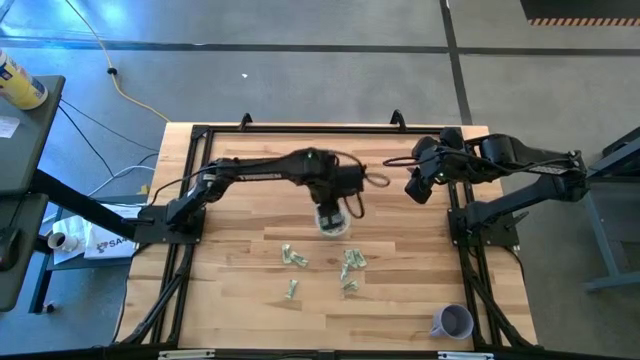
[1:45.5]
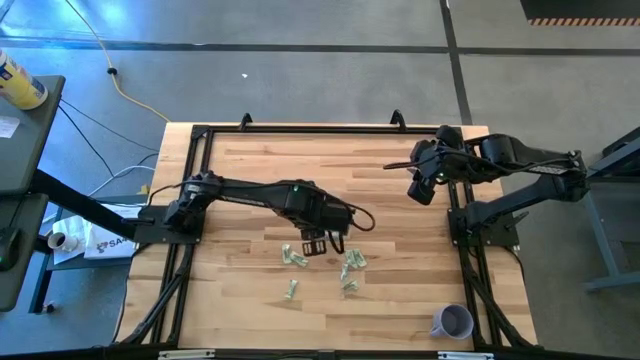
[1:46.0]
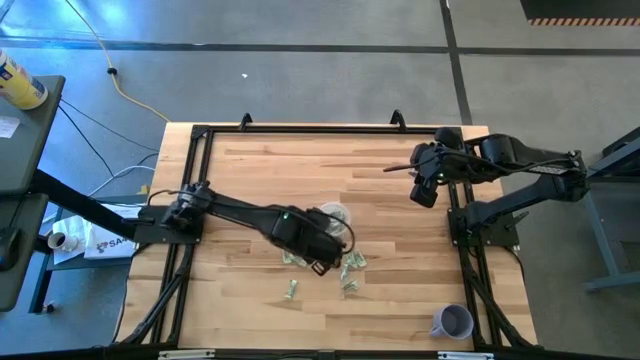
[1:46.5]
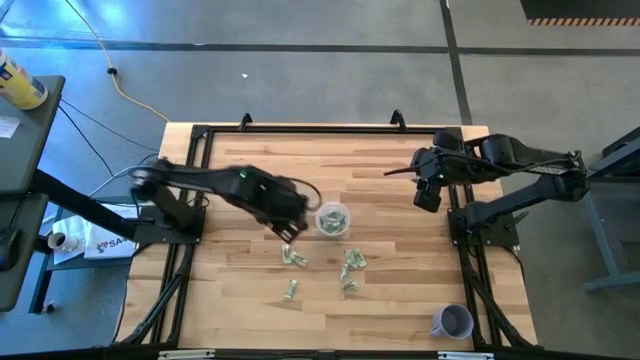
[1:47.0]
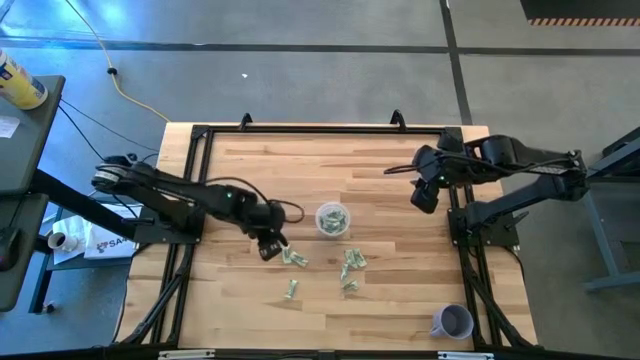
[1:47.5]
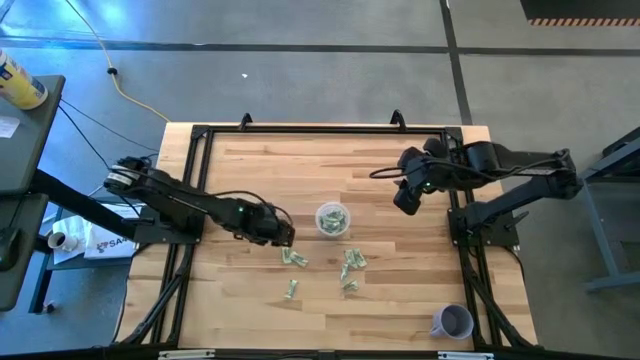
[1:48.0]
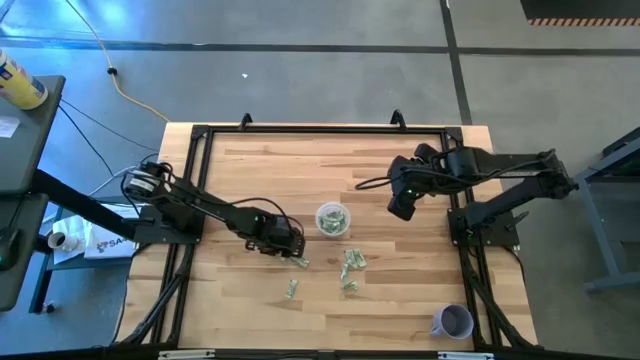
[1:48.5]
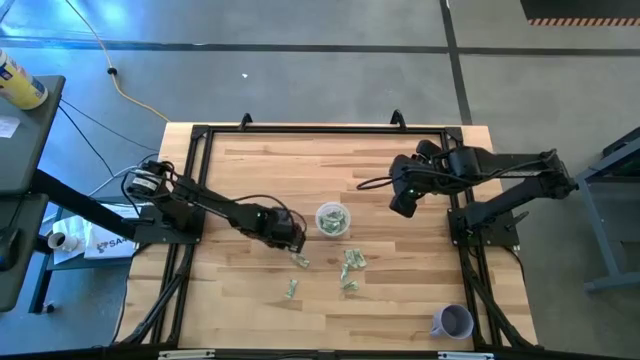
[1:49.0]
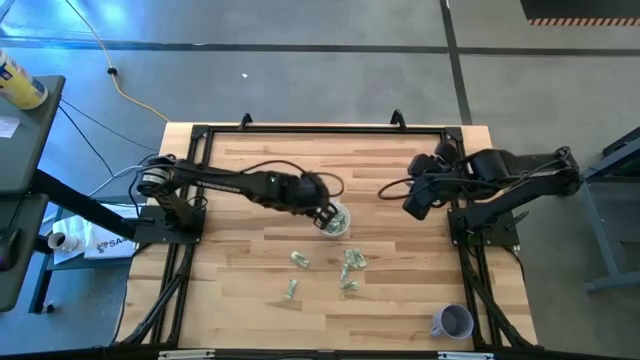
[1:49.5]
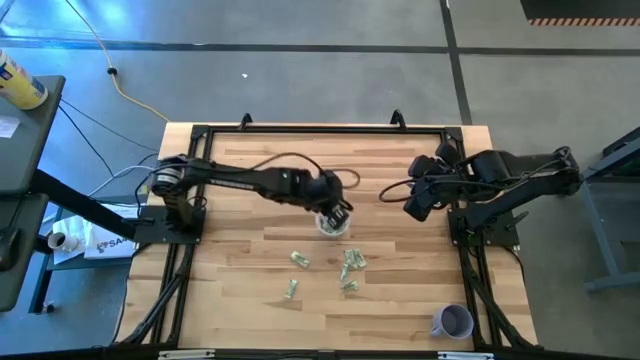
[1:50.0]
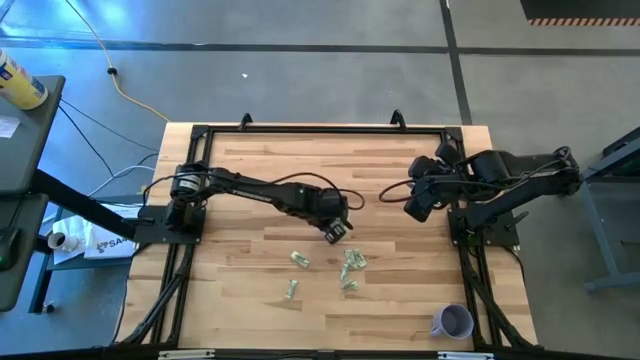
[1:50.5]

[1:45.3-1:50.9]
Task: Pick and place Stevia / Truvia into bins
Put the white stevia packet into the transparent container

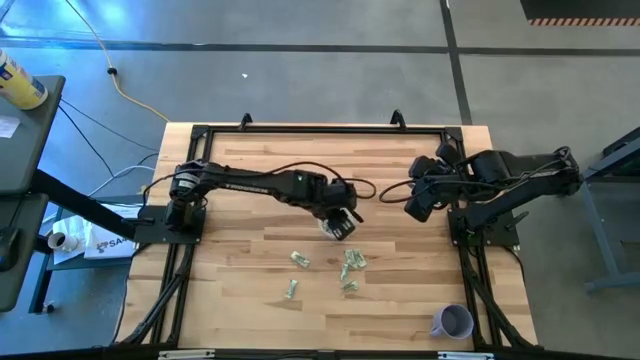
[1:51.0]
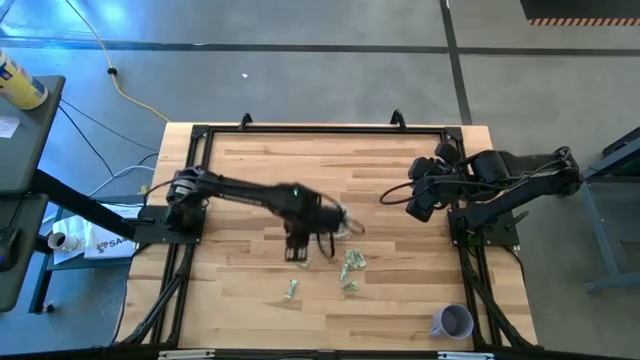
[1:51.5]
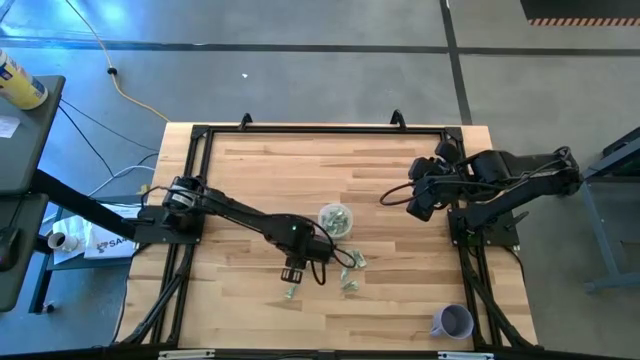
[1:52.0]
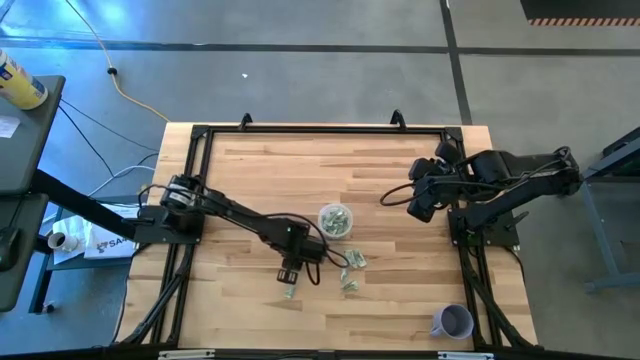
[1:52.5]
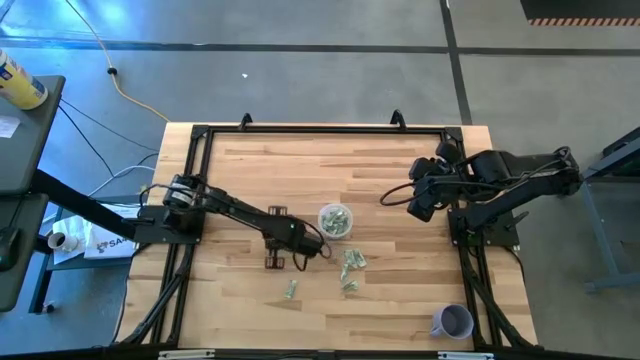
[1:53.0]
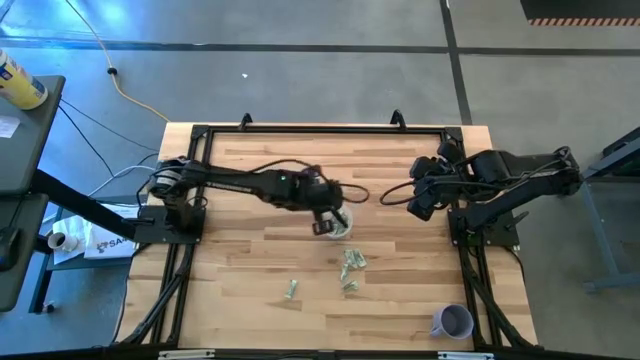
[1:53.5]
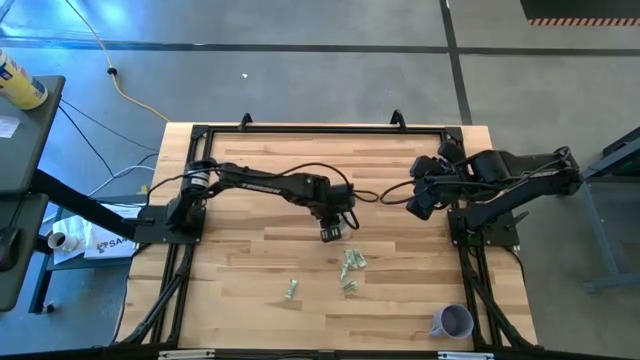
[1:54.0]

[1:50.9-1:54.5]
Put the white stevia packet into the transparent container

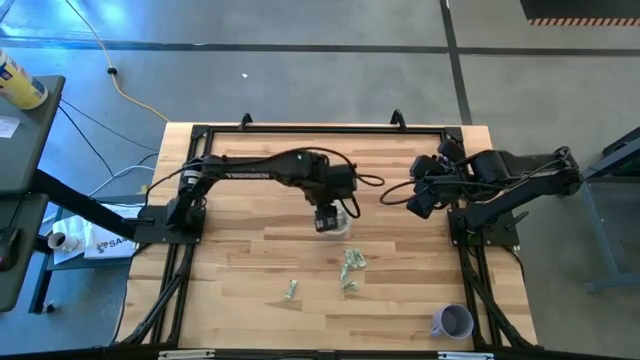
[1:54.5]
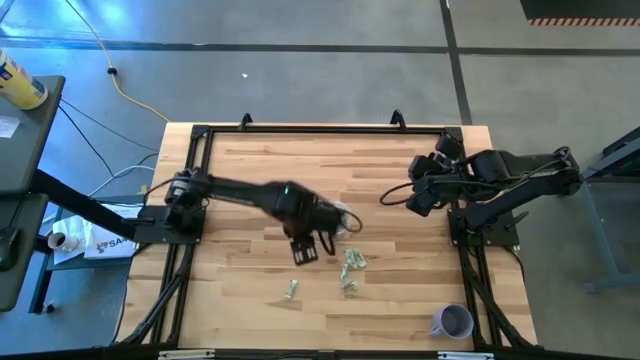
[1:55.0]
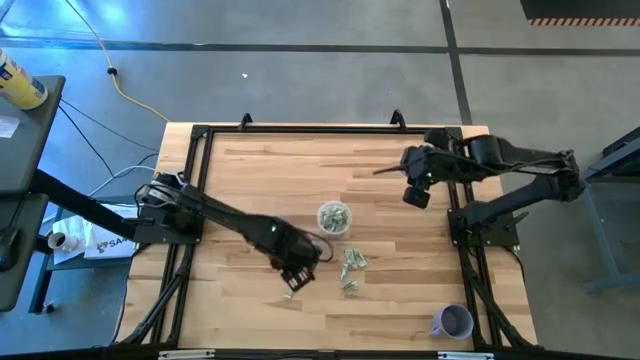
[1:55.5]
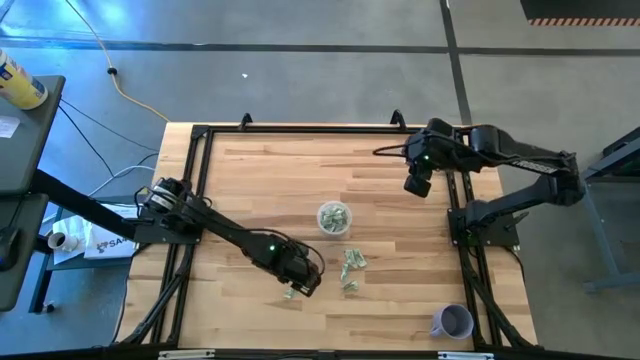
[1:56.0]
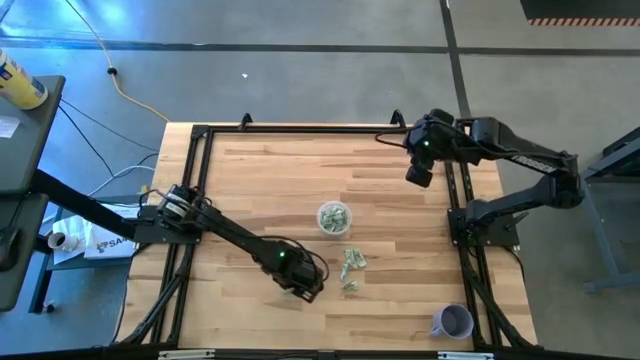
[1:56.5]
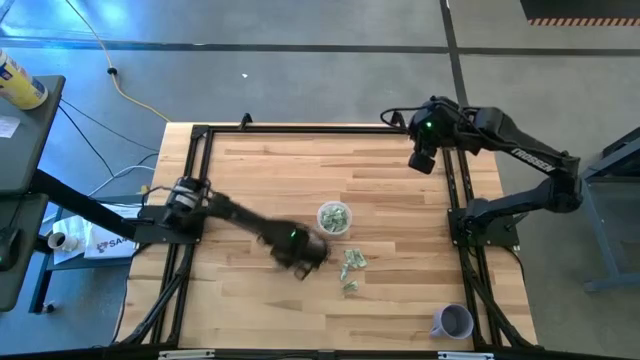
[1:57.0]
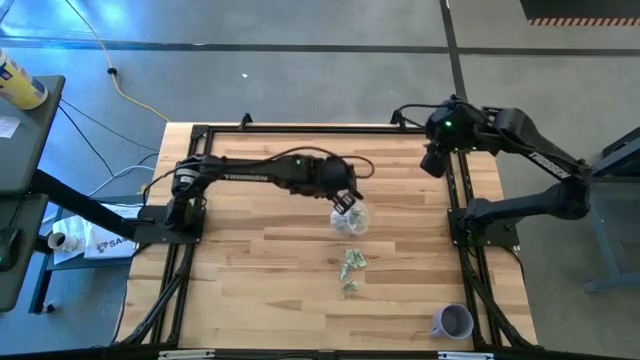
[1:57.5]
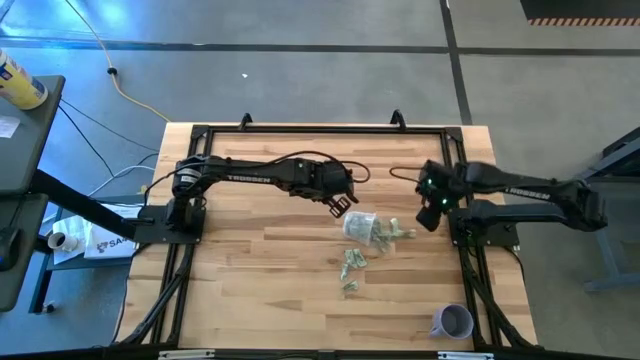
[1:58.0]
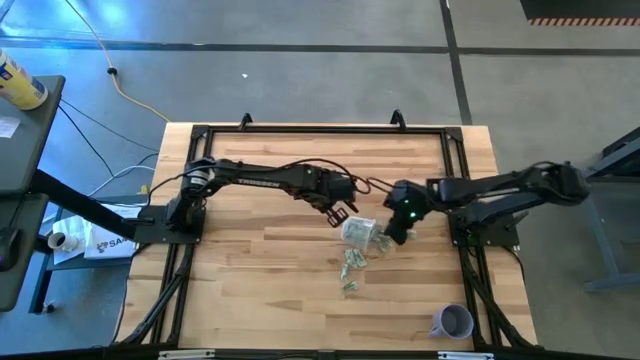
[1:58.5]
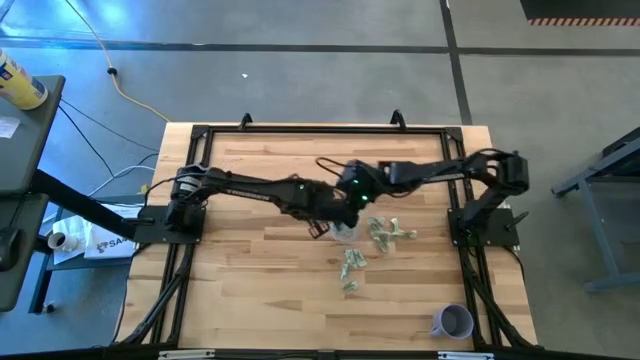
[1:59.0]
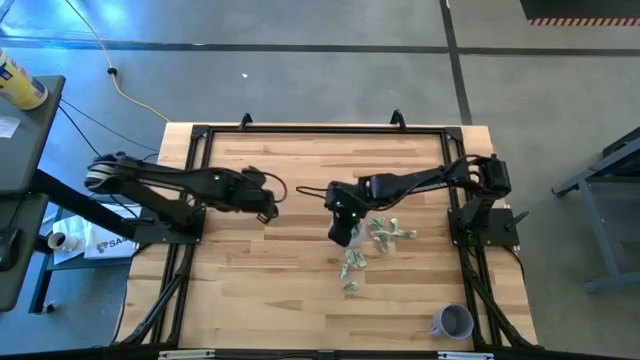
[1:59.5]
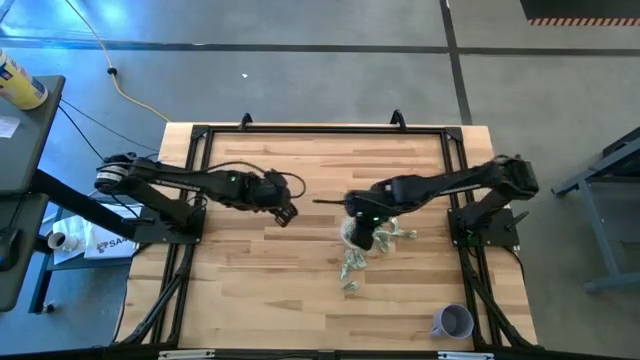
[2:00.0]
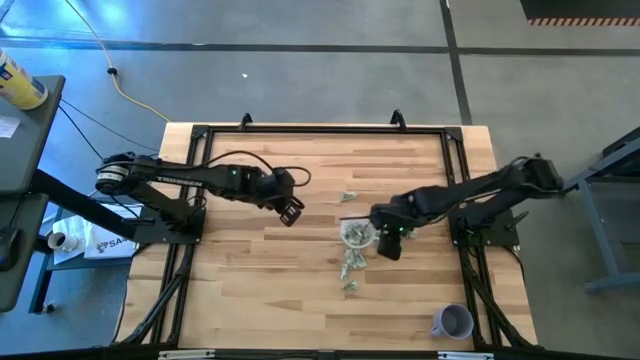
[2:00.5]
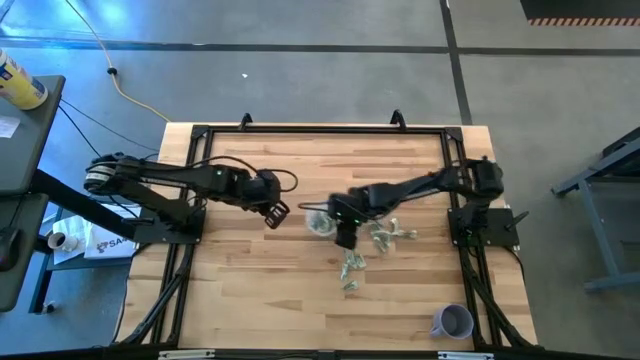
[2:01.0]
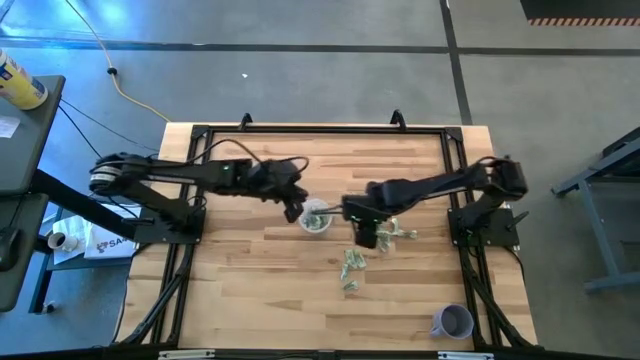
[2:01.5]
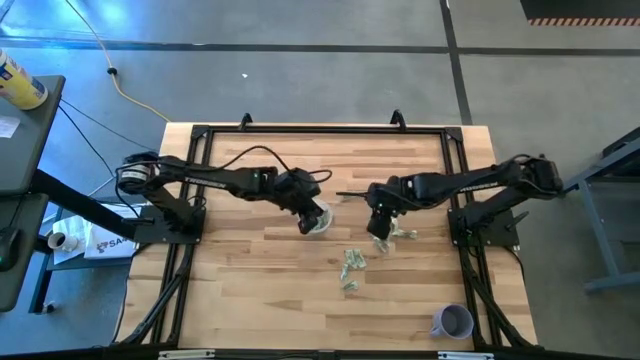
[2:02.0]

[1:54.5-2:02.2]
Put the white stevia packet into the transparent container

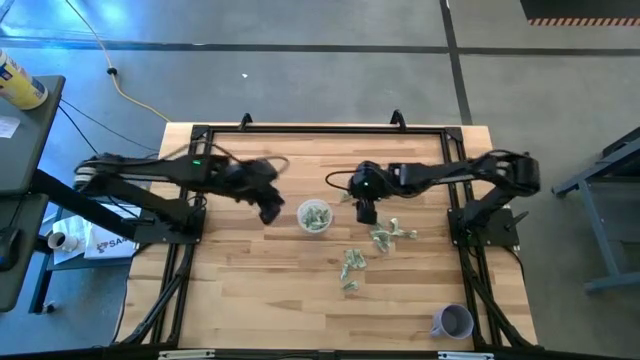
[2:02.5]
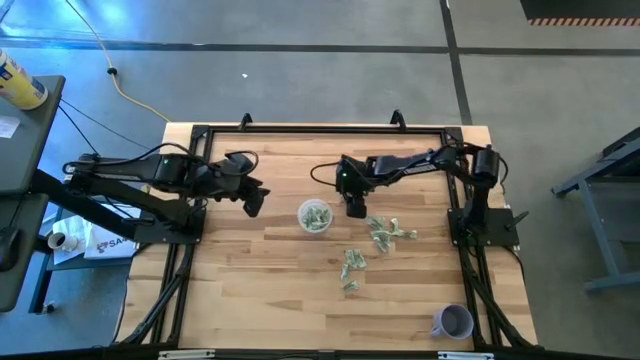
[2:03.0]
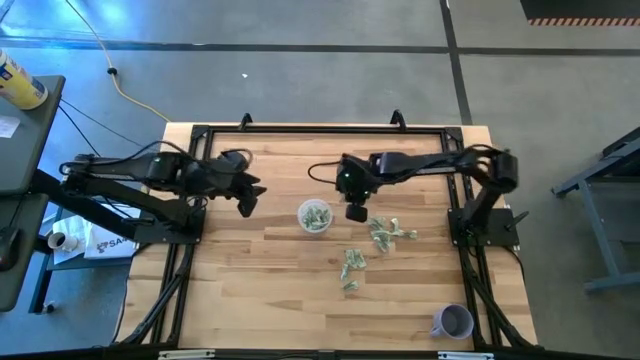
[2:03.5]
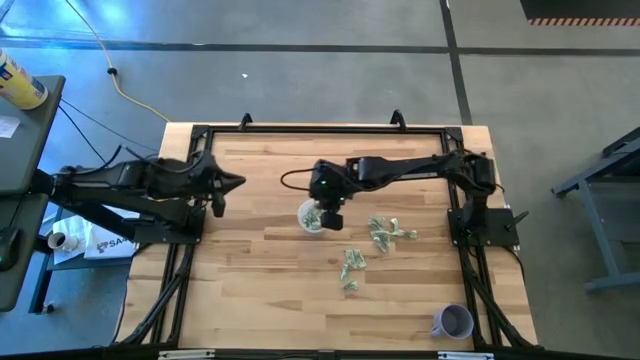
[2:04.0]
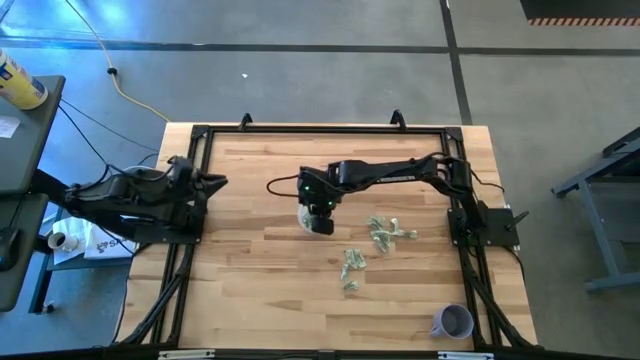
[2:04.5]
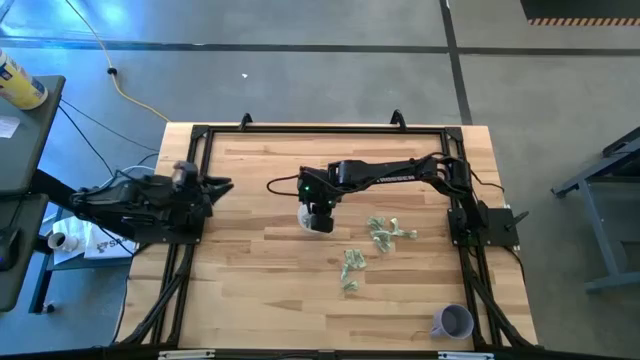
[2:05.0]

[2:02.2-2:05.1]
Put the white stevia packet into the transparent container

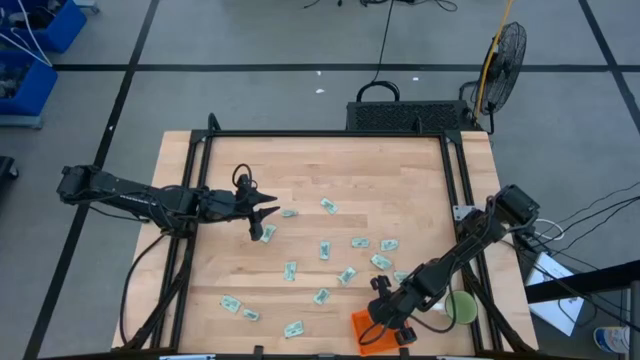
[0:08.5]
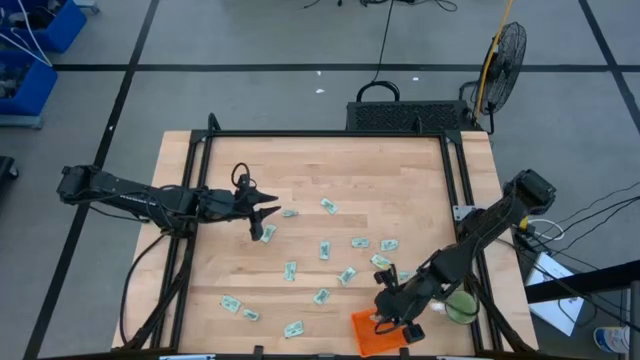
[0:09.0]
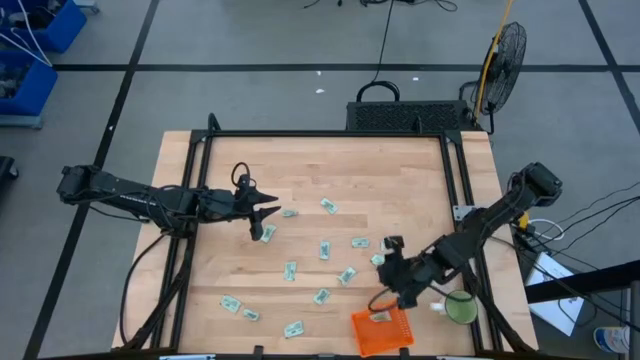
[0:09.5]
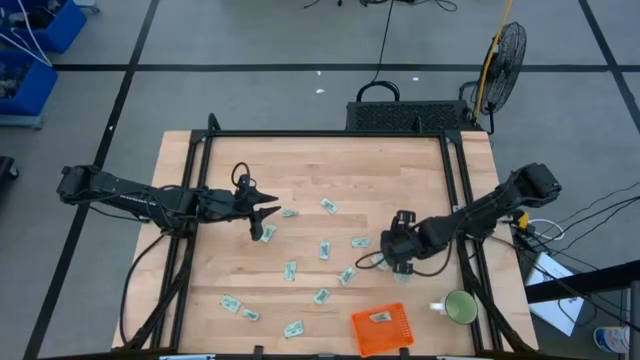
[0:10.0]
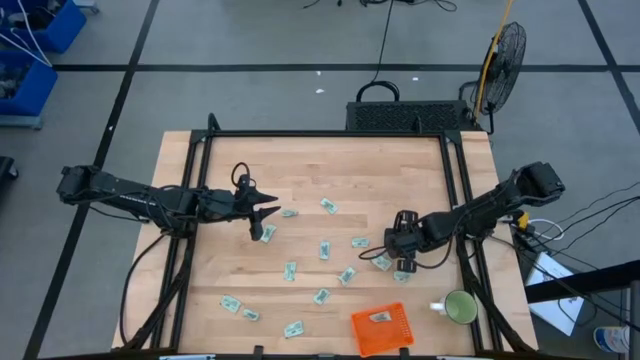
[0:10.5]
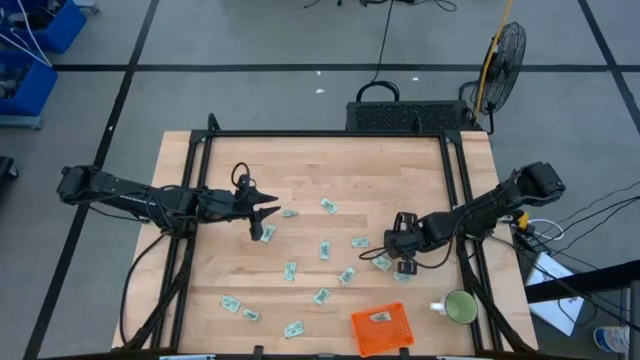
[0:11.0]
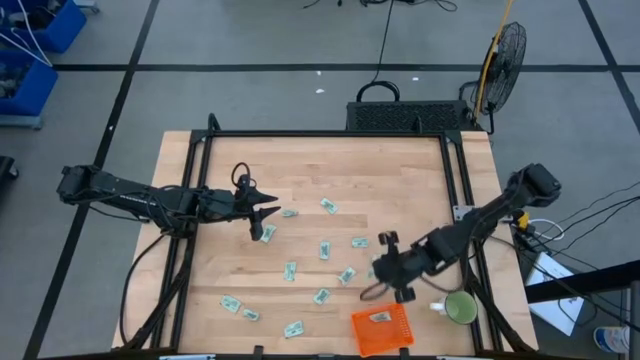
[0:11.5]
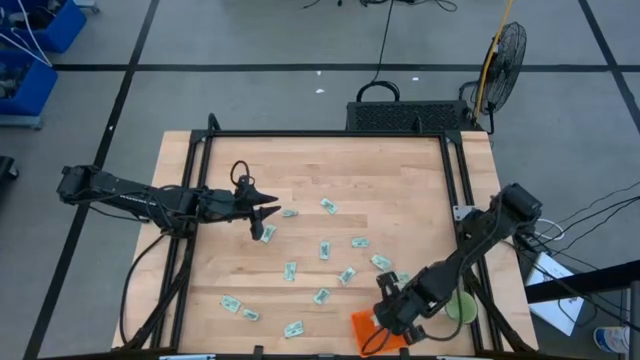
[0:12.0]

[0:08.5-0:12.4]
Task: Pick and place Stevia / Truvia into bins
Put the stevia packet into the orange bin
